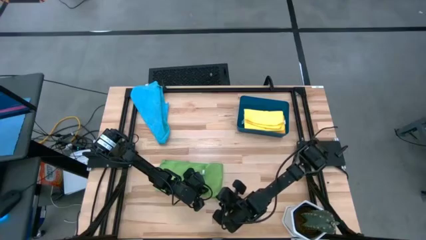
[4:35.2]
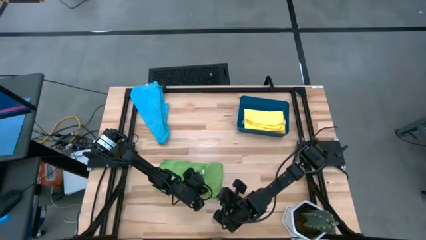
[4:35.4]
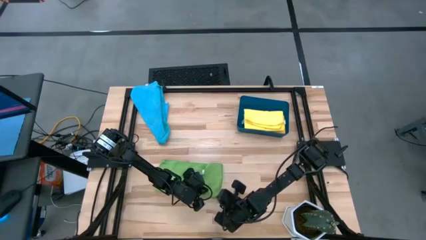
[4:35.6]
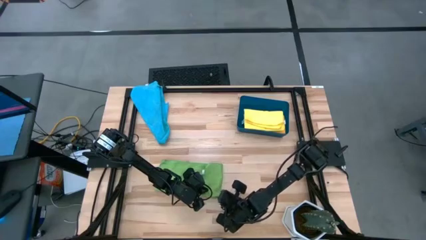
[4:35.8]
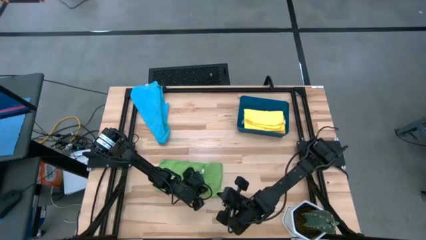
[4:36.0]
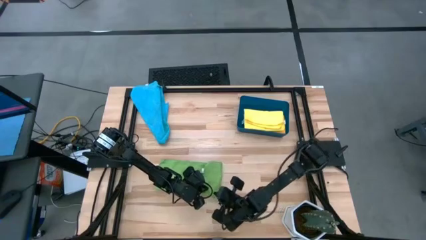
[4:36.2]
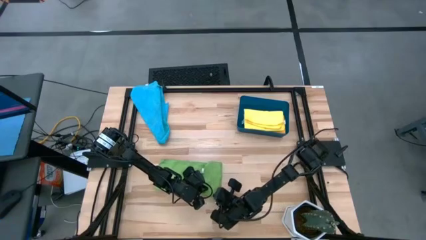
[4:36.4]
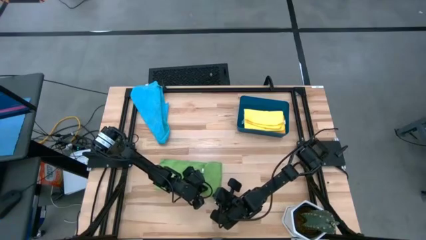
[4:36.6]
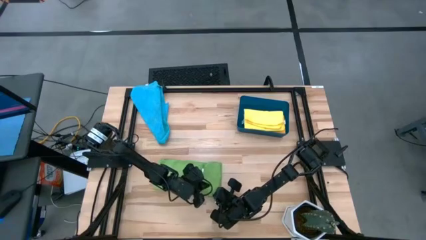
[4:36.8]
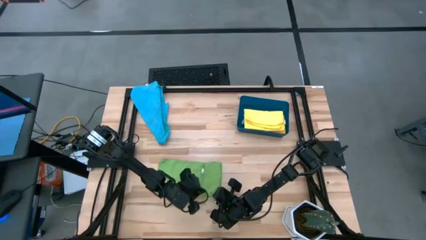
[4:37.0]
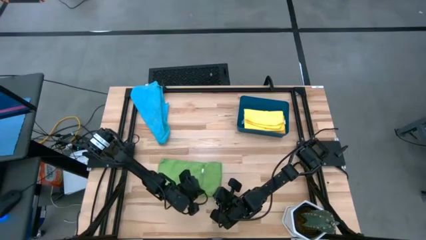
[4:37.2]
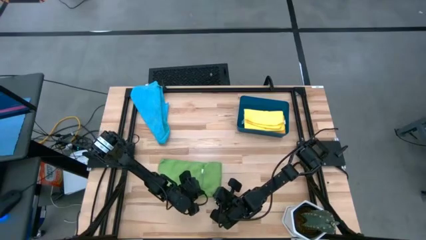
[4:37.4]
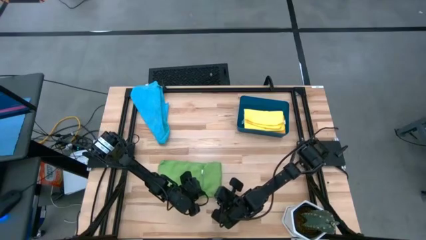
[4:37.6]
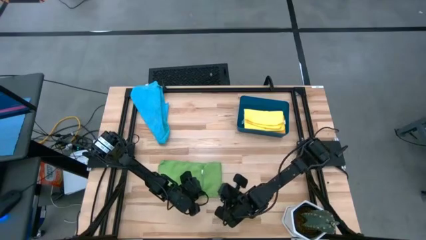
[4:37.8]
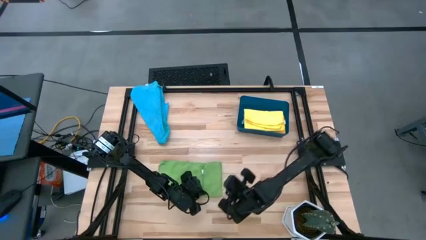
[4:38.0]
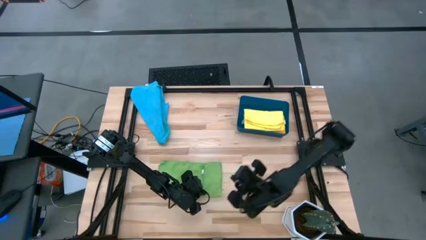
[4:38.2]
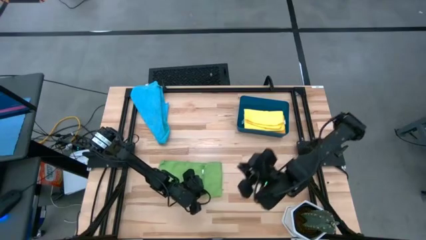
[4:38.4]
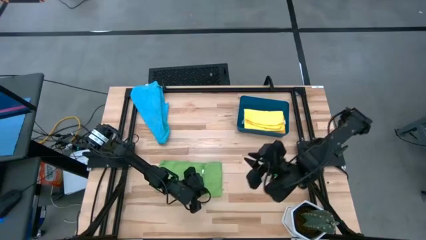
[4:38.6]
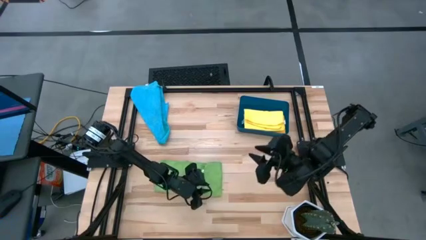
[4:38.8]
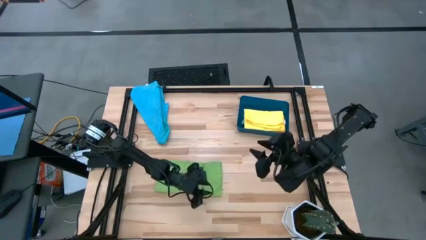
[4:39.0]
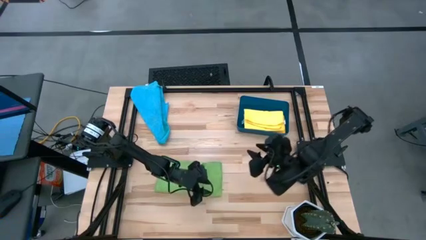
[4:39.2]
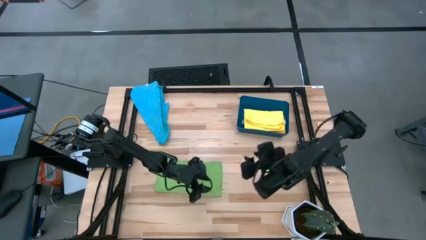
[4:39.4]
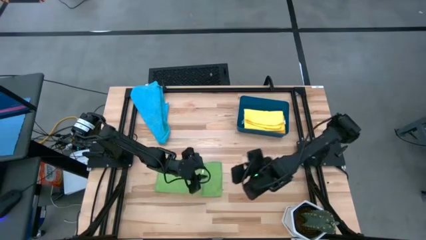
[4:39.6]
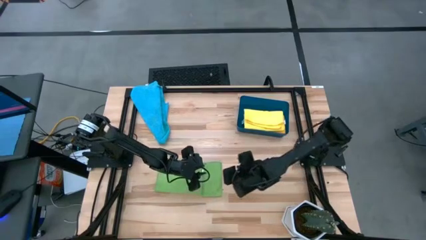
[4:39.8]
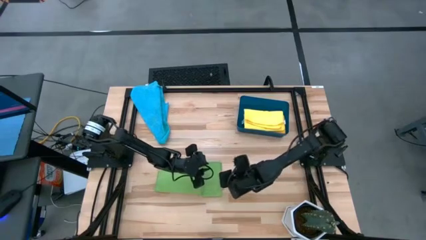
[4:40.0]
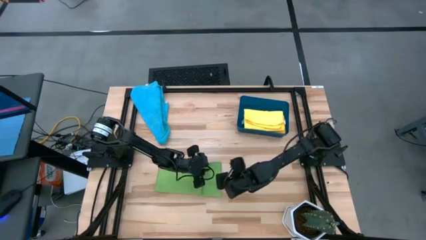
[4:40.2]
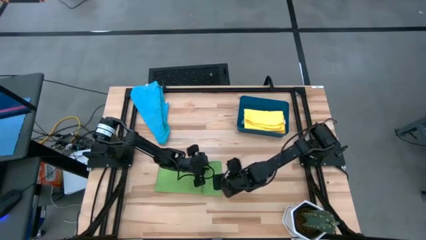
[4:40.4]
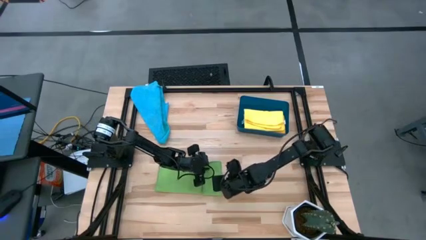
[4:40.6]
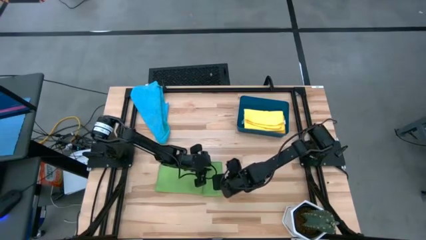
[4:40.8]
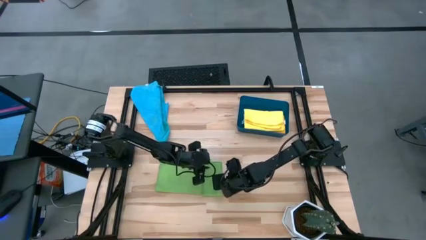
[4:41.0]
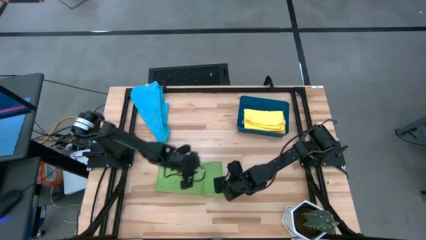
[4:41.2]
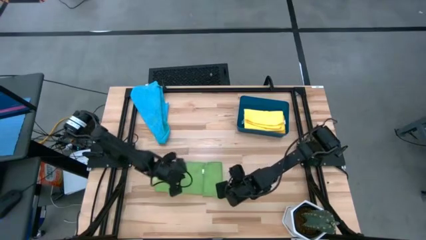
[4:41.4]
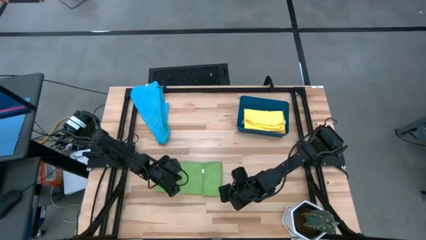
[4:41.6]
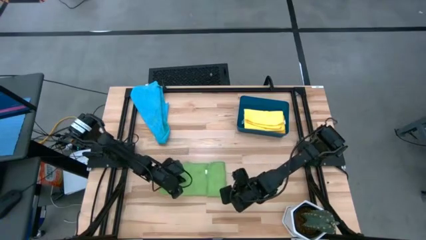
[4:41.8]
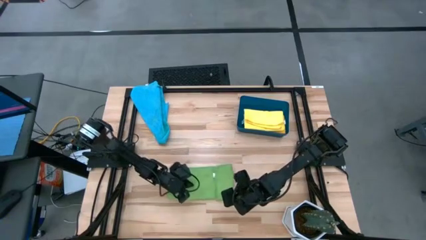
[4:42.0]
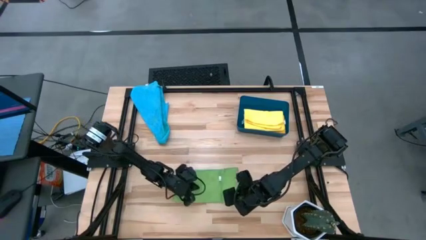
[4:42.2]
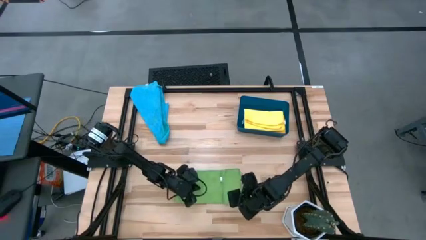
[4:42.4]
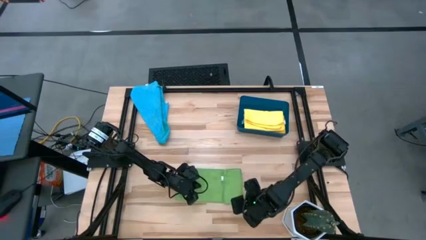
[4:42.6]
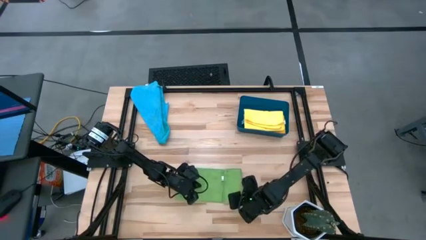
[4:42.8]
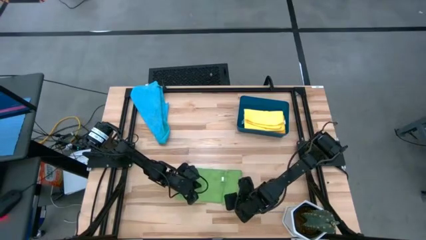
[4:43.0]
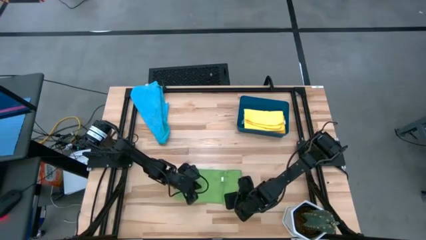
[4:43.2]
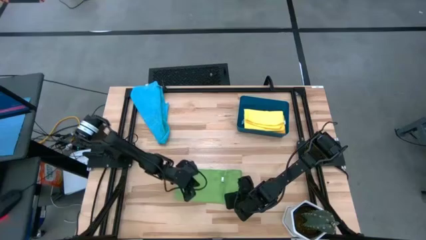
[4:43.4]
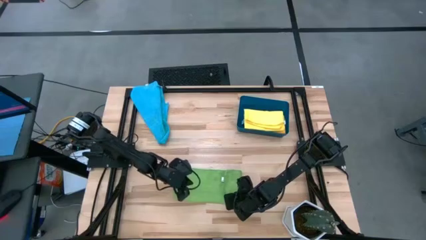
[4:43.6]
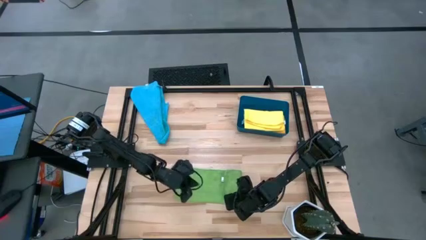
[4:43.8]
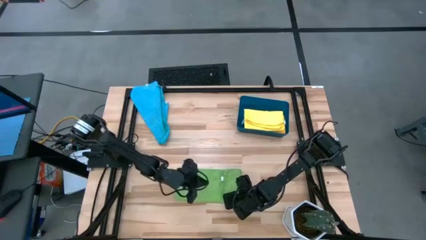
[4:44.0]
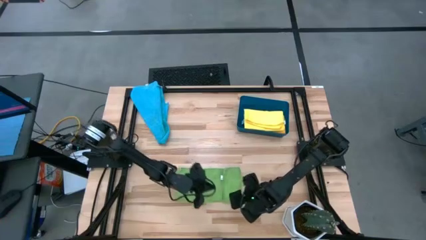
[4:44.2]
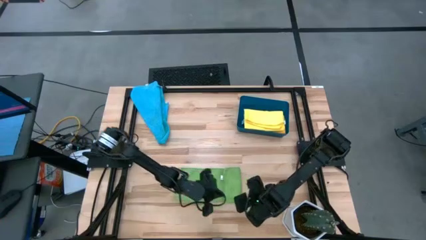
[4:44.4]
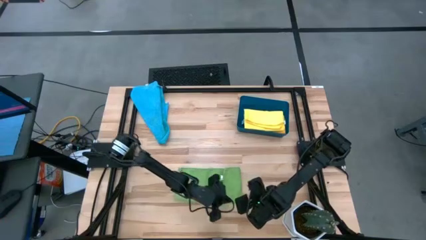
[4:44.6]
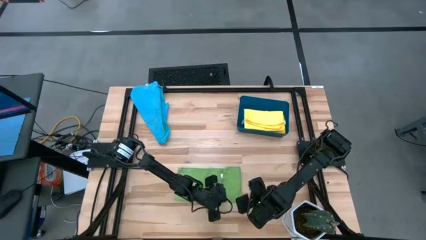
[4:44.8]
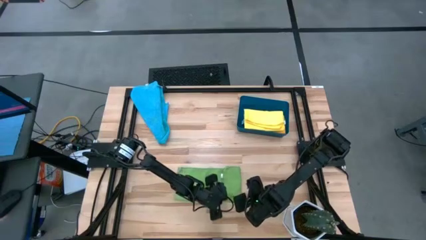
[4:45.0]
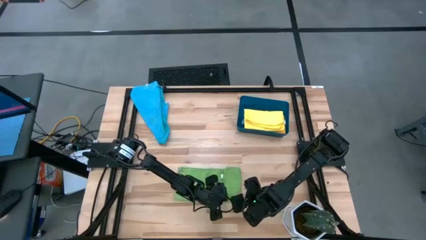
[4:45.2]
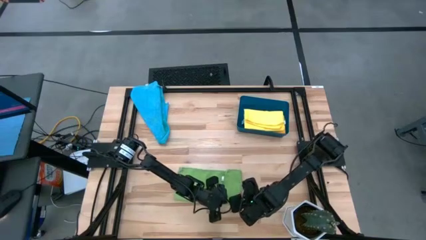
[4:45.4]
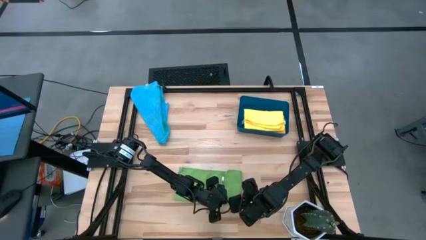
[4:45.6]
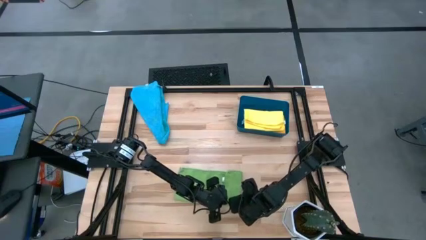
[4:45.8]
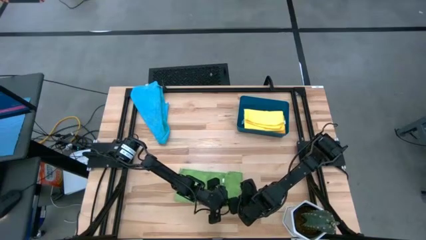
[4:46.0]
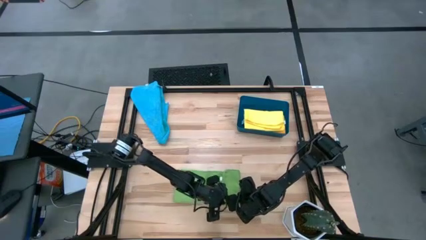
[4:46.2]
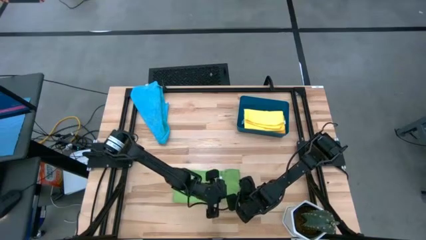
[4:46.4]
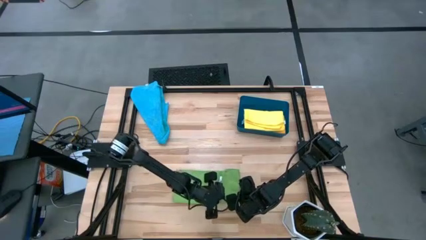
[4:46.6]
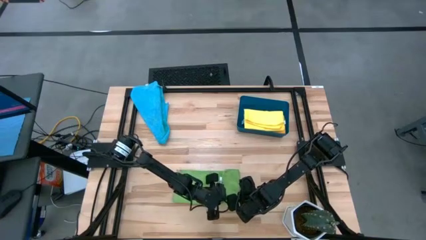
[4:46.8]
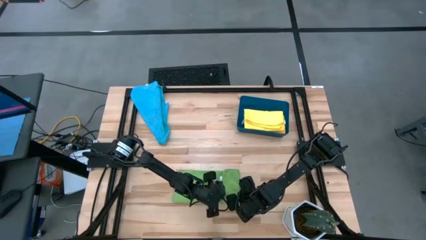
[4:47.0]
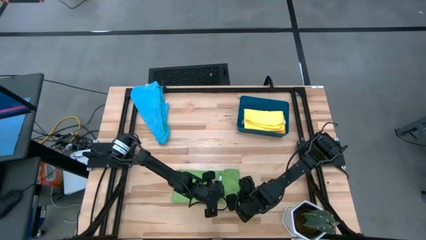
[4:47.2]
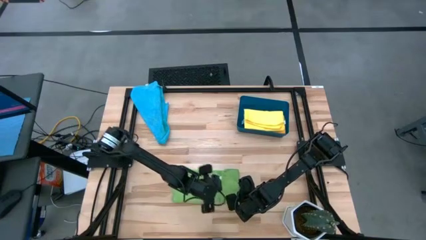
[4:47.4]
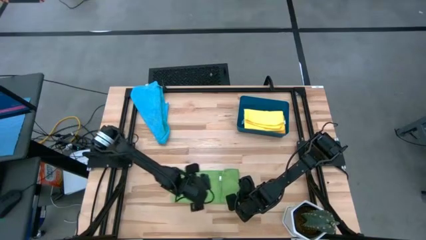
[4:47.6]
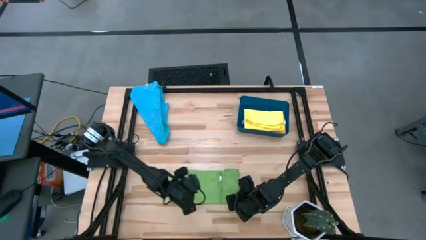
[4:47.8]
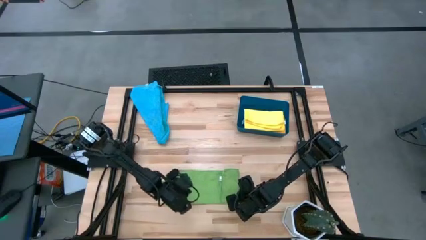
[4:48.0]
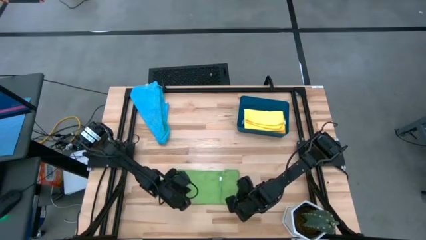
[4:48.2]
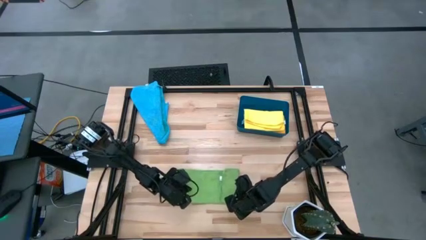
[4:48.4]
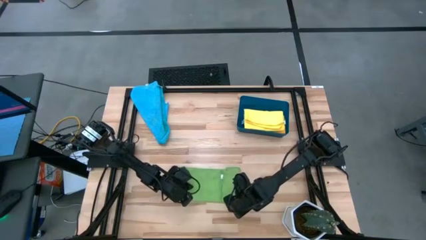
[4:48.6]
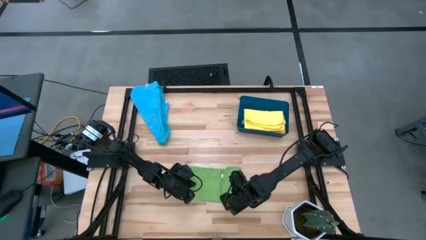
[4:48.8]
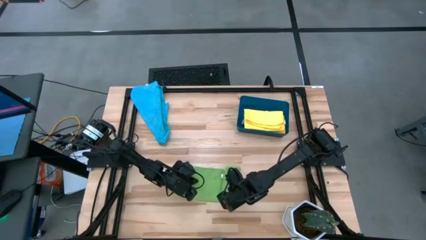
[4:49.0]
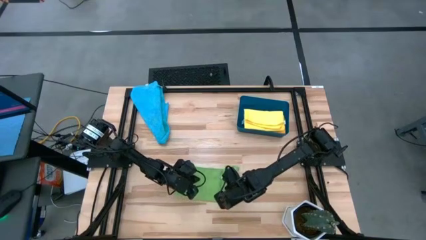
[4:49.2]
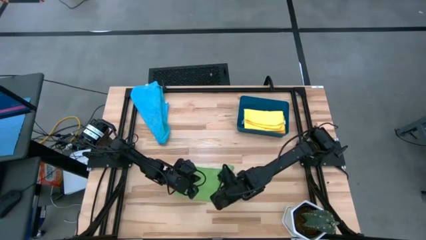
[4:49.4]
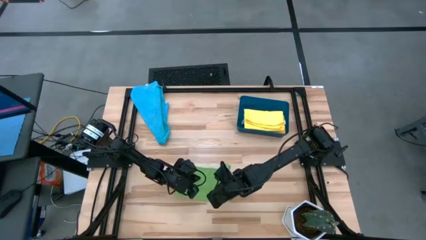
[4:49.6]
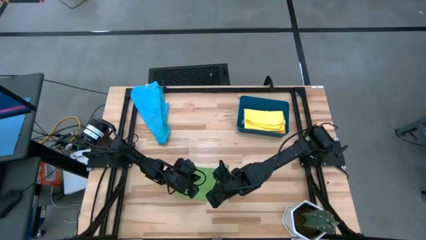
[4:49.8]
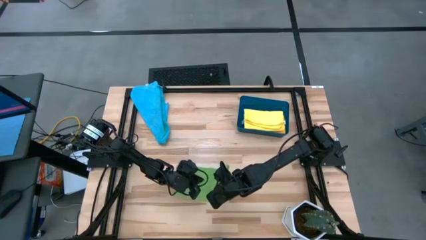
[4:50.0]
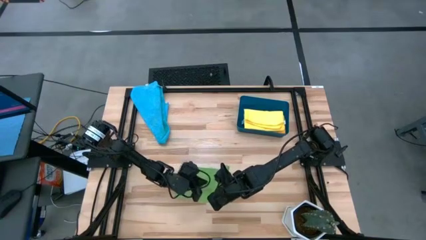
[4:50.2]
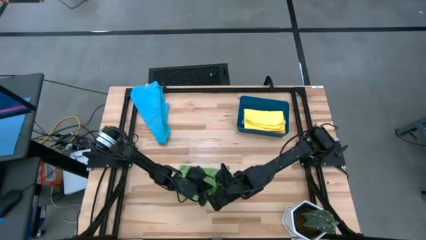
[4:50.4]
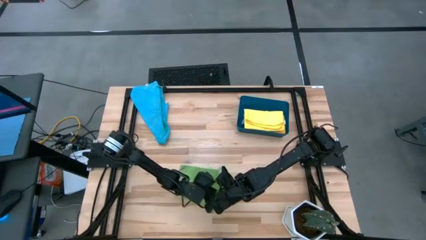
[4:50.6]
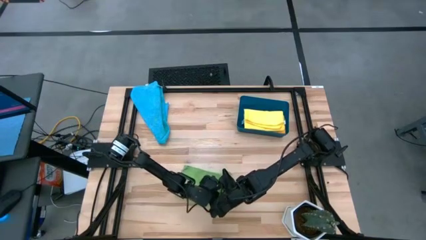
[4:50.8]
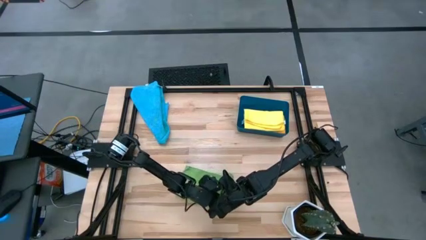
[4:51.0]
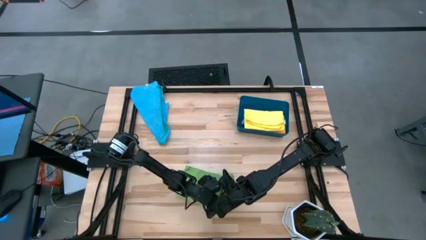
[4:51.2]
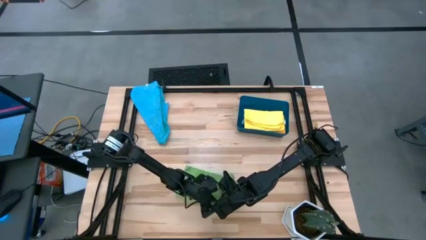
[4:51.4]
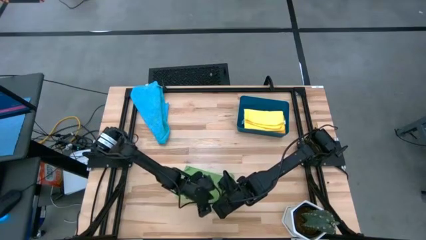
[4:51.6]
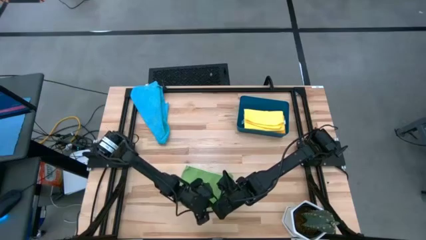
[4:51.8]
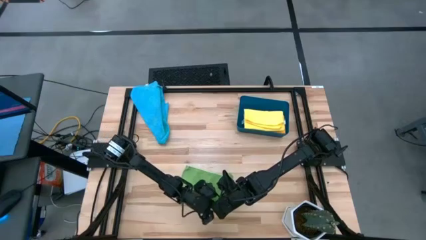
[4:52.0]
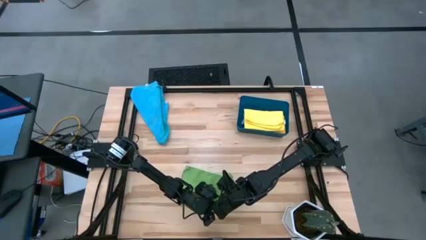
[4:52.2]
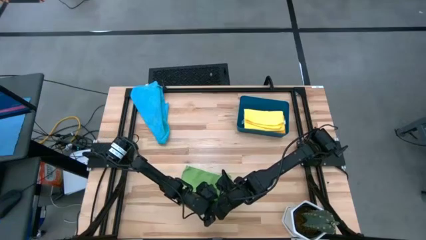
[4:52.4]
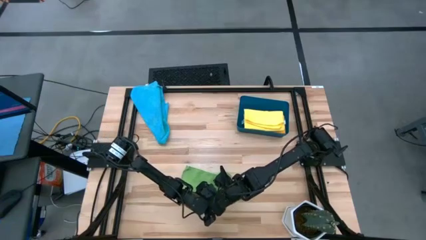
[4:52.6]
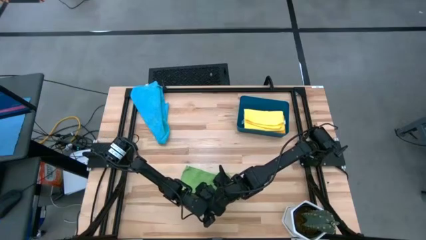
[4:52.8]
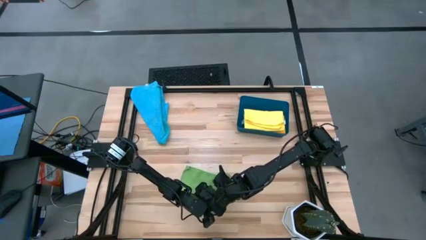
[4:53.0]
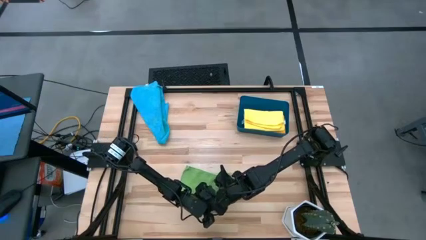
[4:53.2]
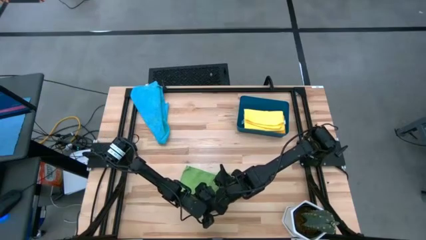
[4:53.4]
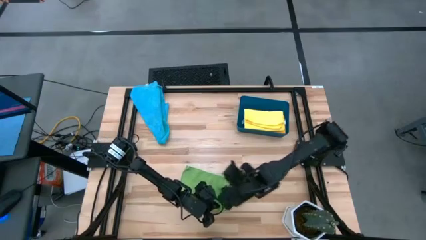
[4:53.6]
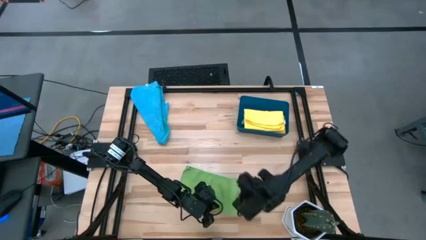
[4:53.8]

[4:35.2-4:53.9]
Task: Fold microfiber towels
Fold the green microfiber cloth
